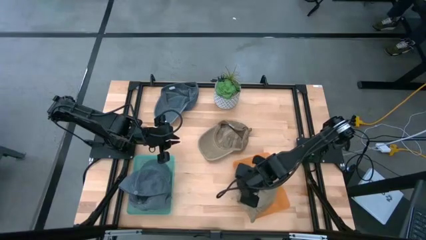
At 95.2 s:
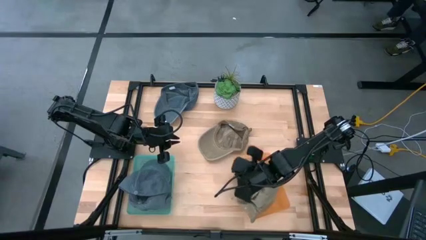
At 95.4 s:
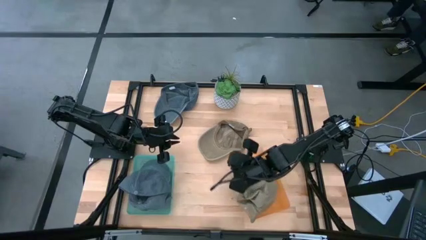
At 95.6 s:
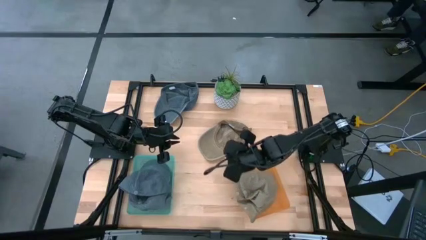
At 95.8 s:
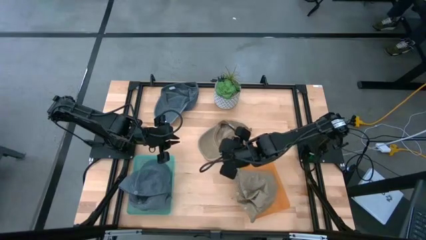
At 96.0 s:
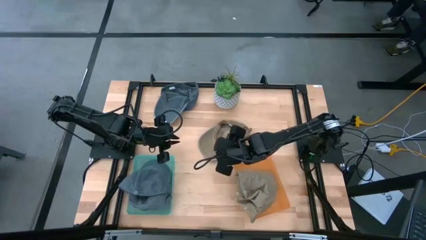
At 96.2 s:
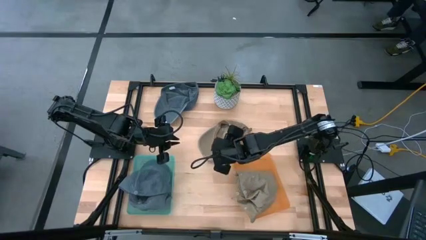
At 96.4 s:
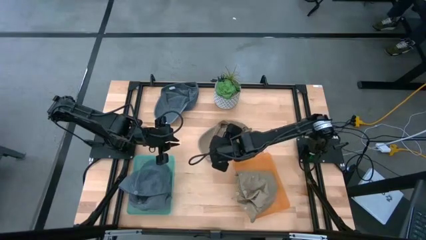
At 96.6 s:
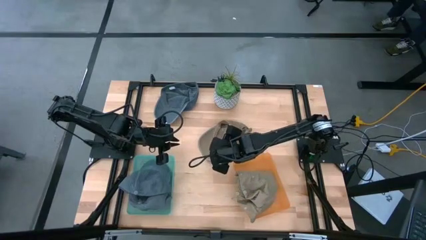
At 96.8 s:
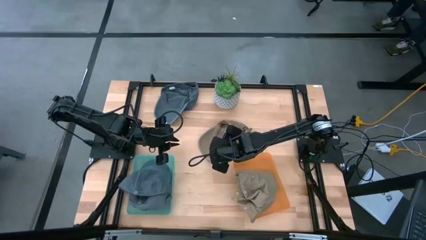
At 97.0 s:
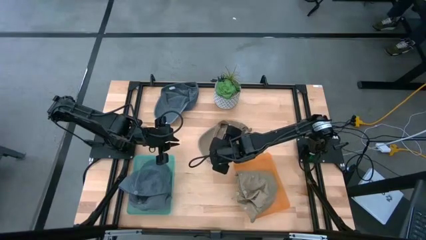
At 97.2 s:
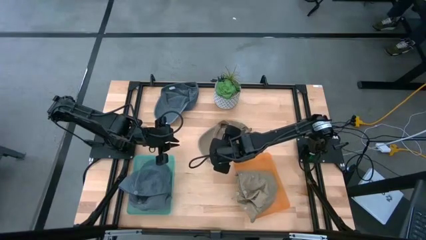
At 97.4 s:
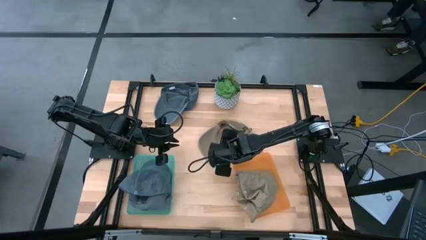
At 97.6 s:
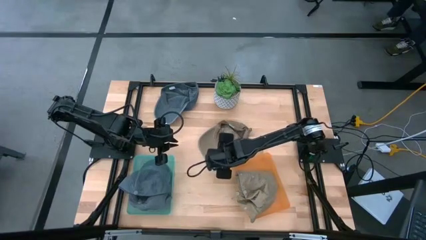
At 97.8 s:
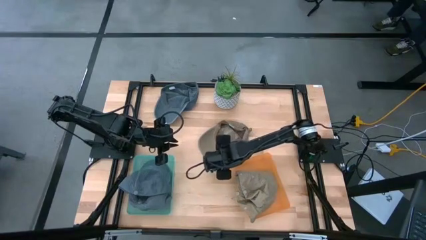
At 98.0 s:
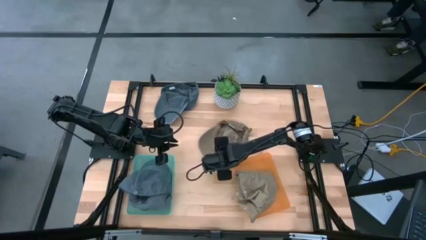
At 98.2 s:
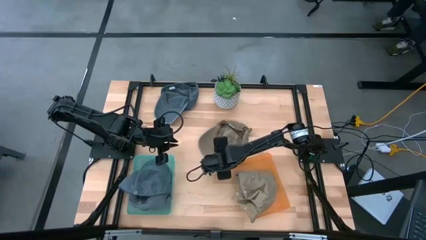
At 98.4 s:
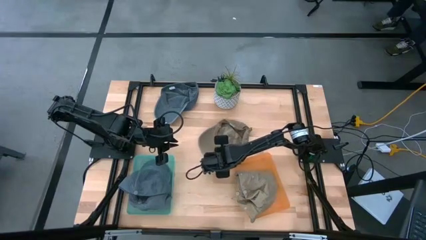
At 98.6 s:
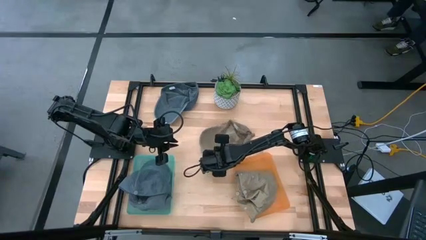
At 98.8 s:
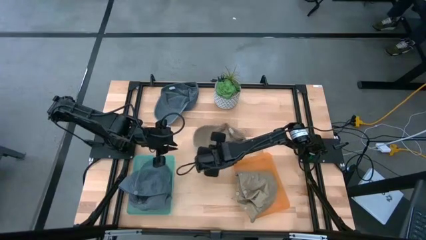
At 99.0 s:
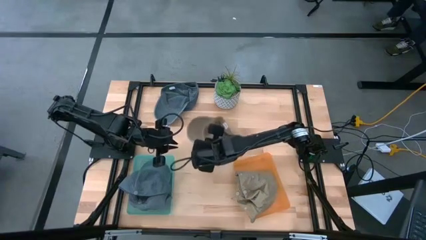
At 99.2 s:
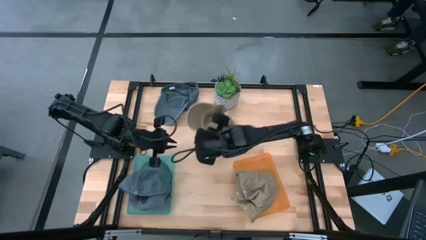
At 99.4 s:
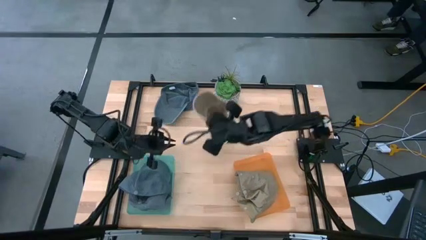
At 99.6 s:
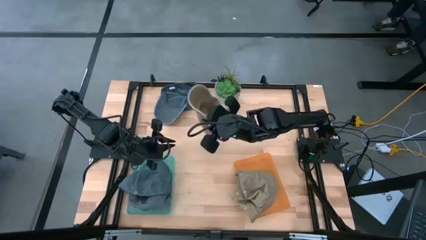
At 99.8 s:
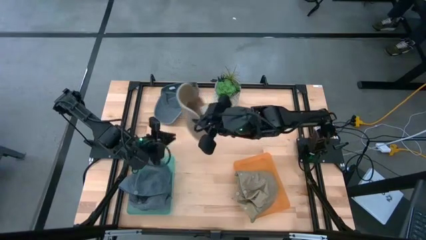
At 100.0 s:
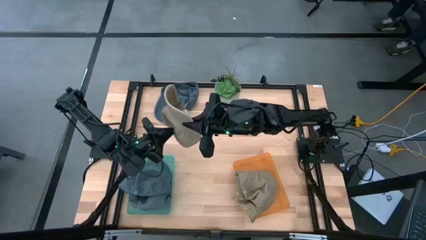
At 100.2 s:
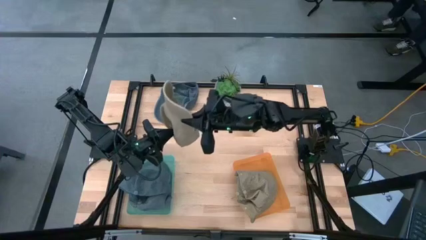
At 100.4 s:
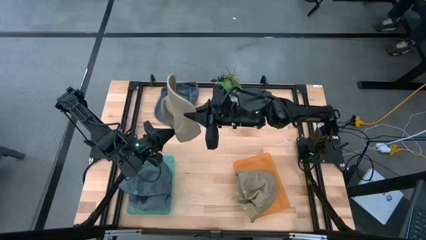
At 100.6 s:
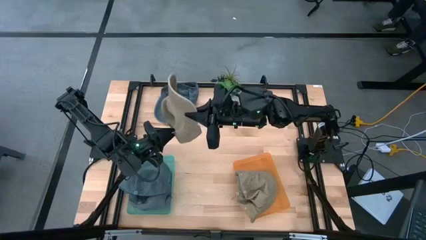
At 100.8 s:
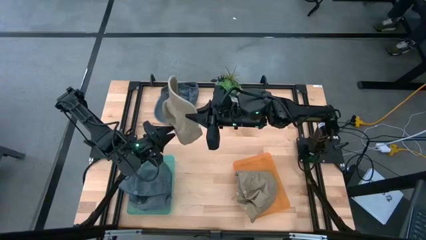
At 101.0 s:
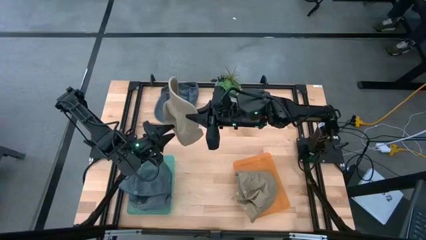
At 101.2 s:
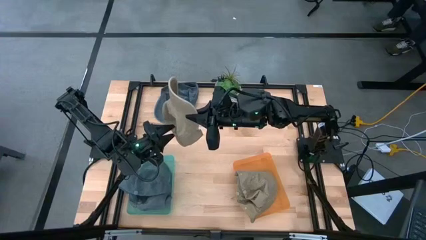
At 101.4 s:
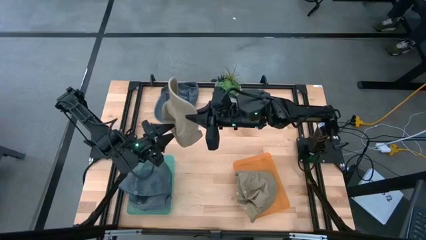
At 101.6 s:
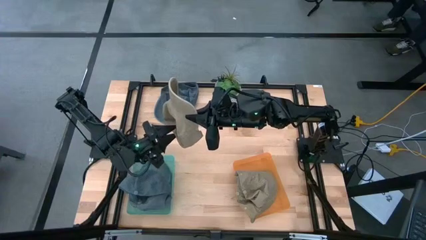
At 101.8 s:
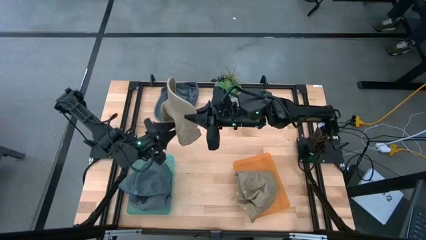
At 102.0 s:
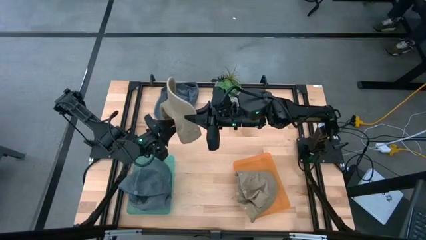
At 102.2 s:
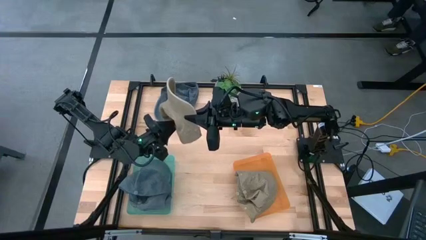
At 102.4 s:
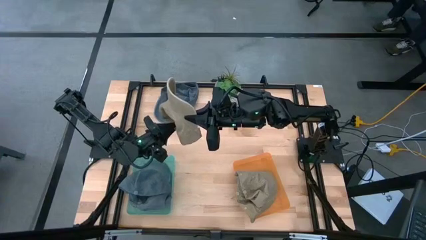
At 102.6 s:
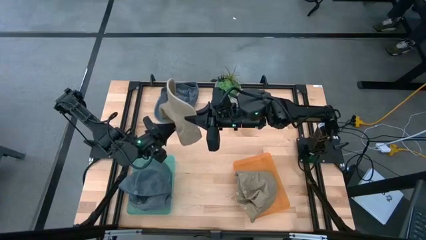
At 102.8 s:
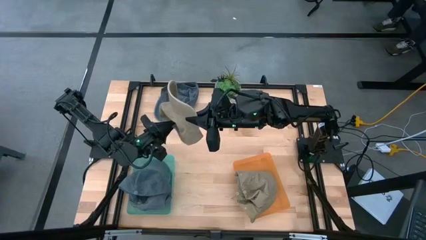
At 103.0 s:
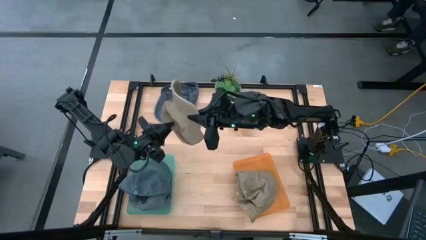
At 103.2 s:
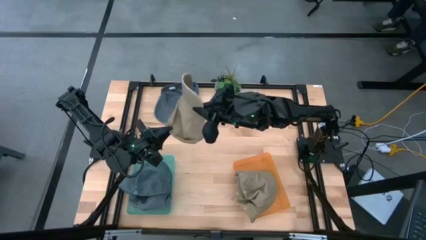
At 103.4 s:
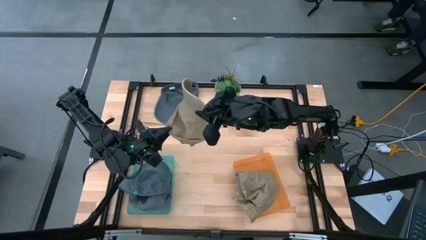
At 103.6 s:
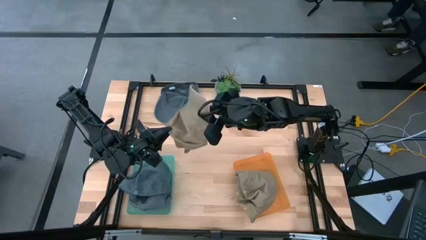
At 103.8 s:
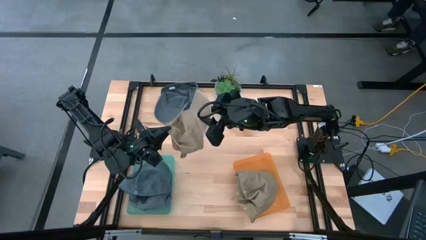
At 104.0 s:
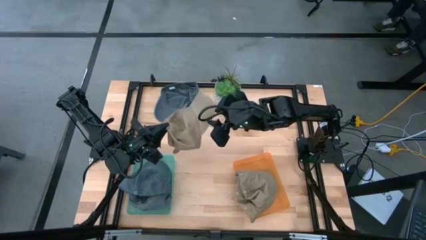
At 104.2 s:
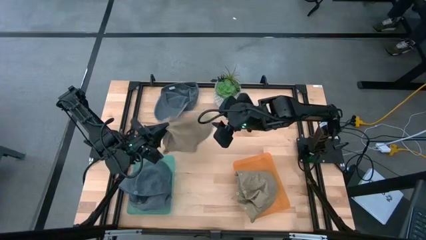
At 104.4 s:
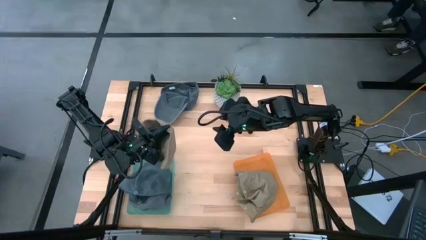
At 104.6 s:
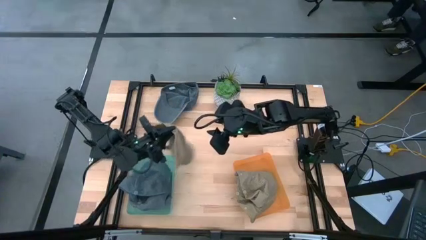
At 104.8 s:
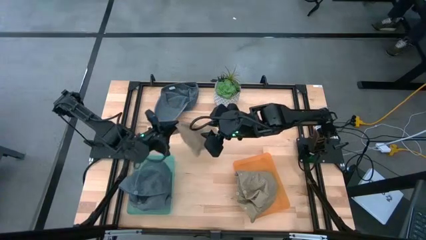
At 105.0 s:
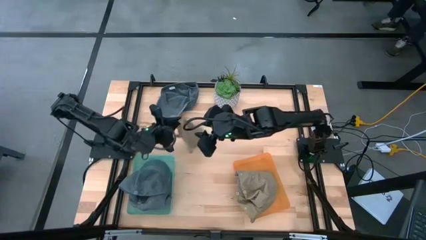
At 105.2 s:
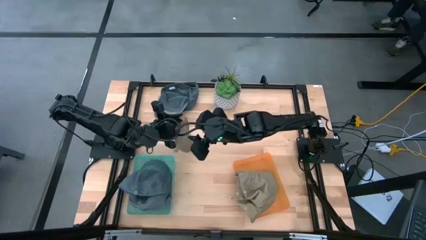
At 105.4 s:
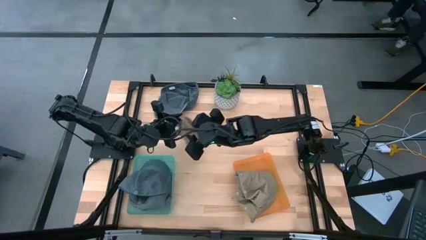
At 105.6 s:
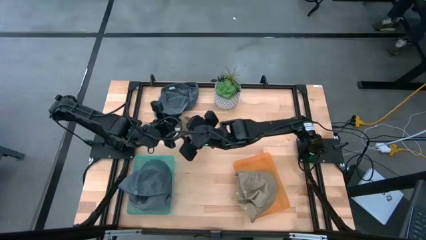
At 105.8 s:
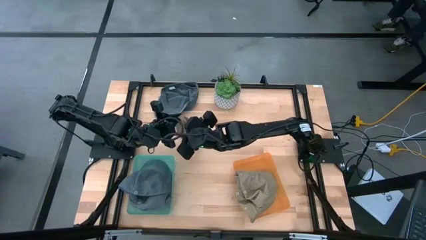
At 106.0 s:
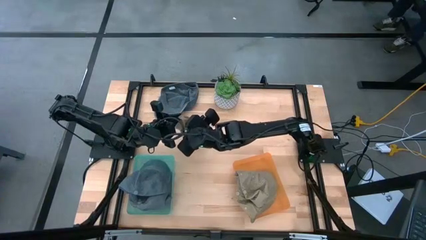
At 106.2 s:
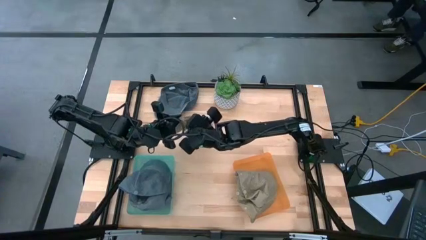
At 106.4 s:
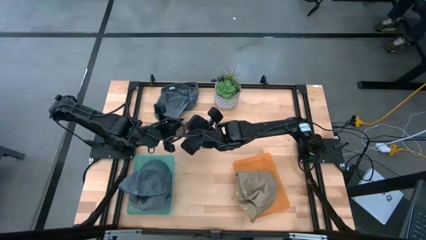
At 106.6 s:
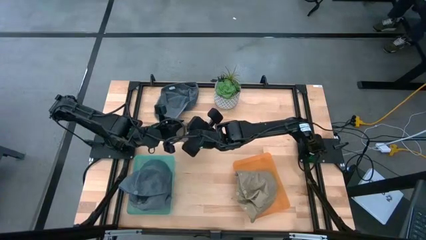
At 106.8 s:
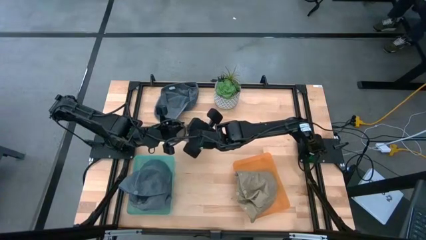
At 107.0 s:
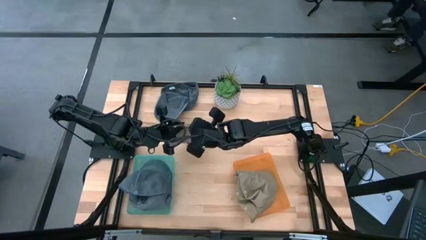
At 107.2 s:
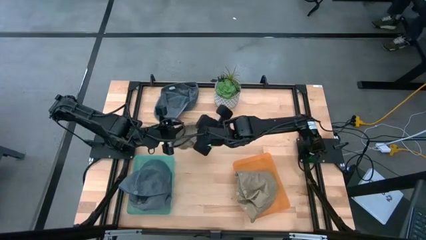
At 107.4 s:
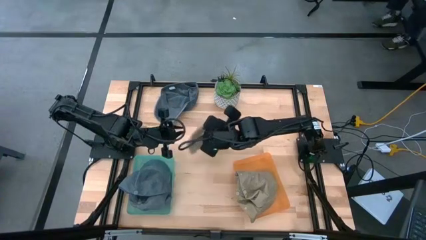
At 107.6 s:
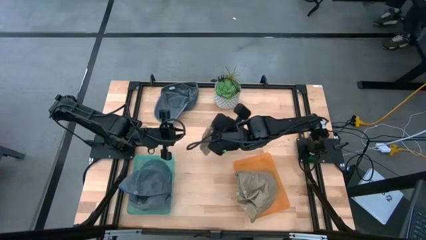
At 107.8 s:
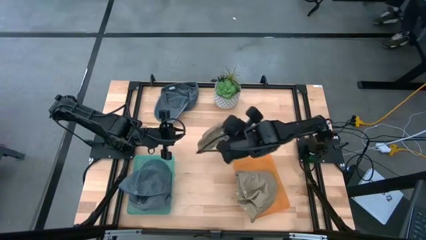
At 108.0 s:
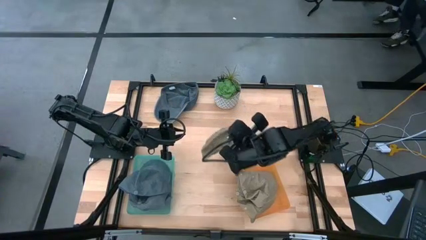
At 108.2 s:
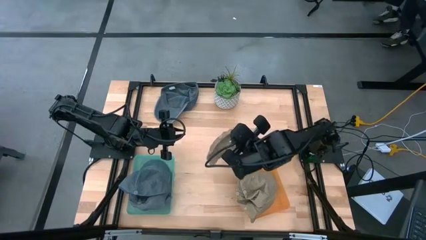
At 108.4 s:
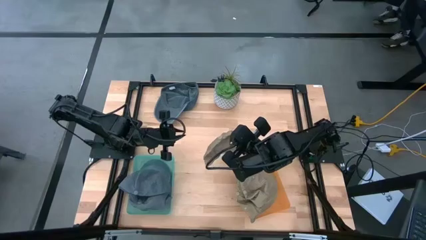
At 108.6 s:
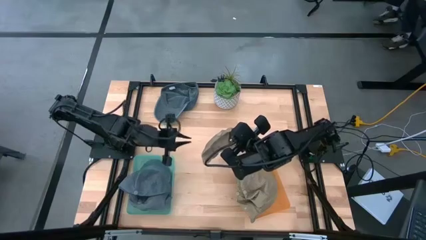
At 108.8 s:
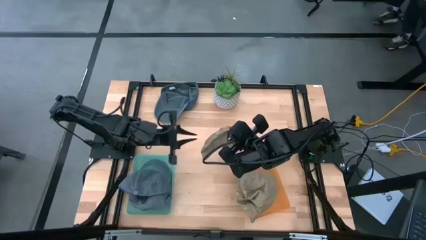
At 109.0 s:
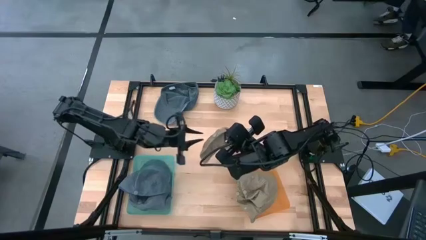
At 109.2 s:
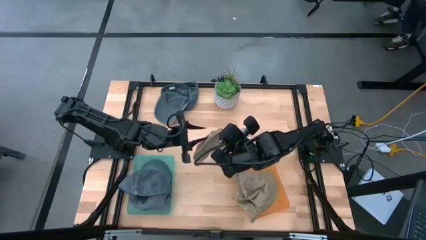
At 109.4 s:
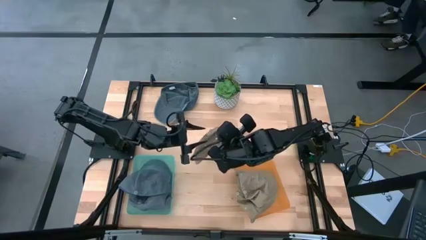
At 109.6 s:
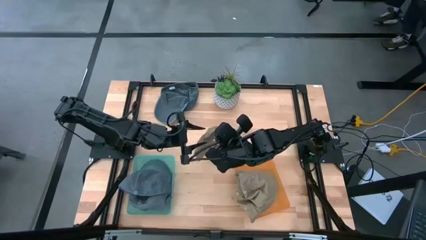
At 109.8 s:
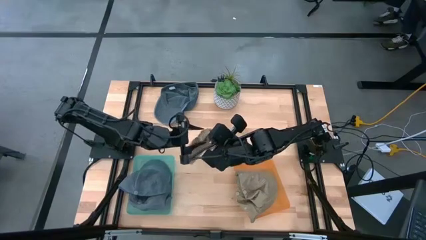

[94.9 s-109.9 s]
Task: Pick & Place hat
Put the brown cap into the orange bin

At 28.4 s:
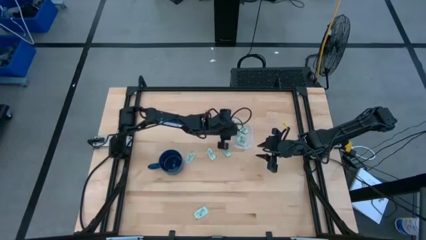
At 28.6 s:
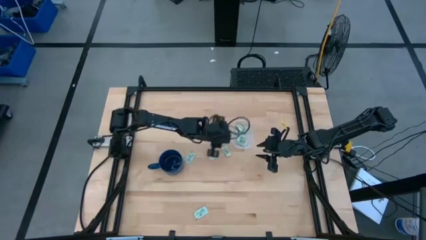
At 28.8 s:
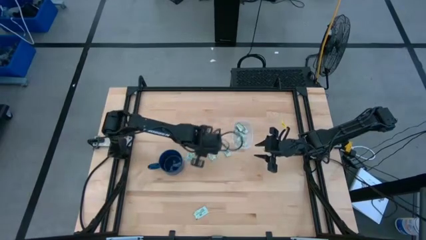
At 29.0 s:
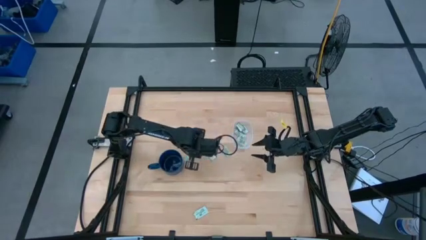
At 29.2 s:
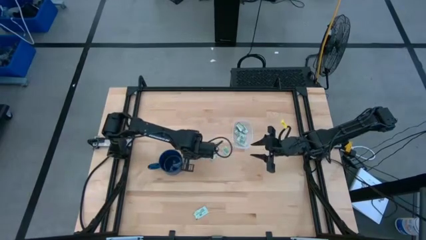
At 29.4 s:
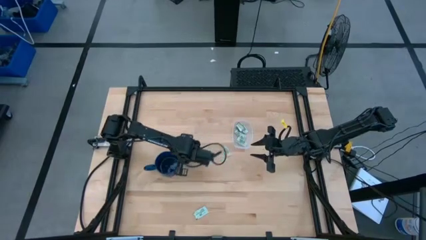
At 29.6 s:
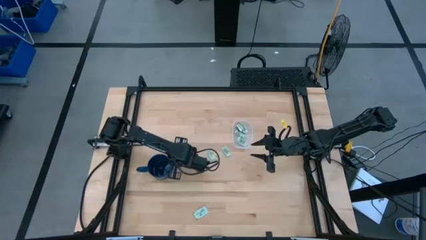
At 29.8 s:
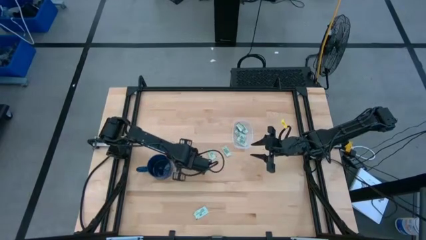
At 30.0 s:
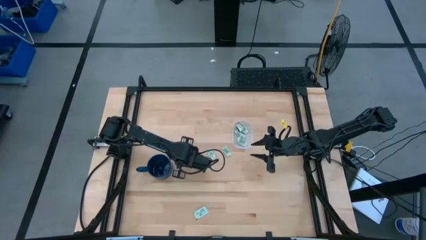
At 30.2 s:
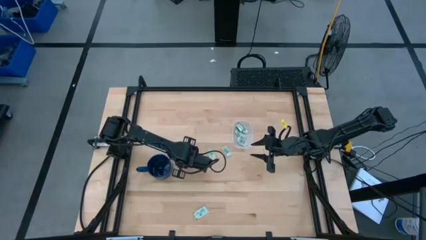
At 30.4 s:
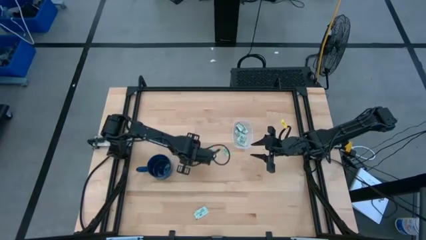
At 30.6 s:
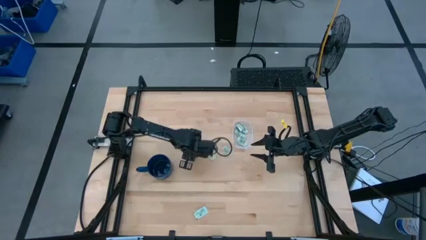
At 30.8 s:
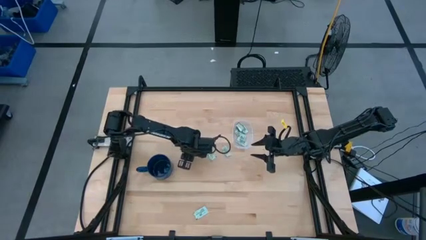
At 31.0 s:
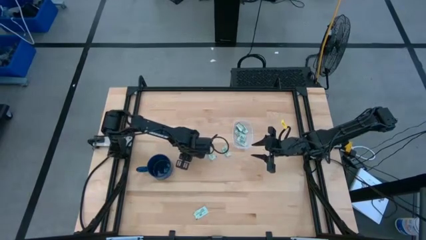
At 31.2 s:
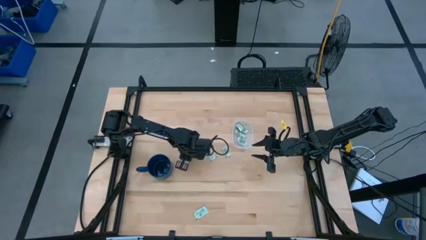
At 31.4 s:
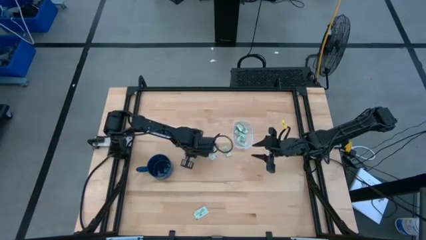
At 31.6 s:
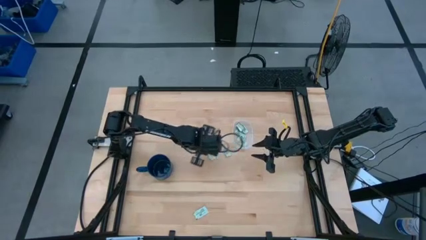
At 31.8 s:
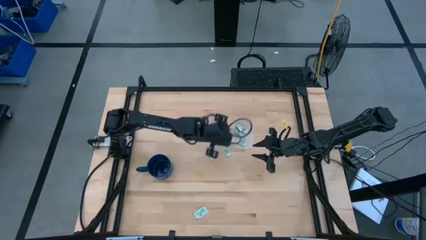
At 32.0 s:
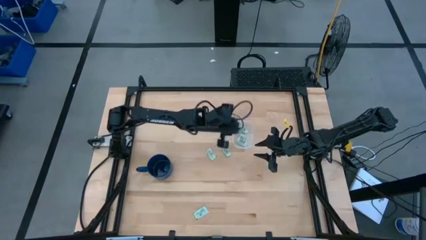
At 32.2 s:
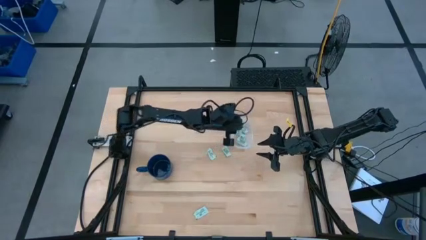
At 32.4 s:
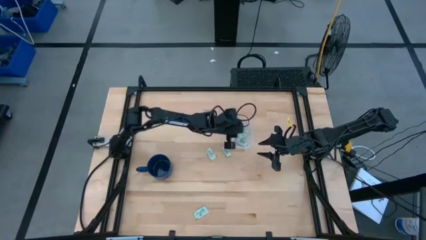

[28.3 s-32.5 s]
Task: Pick and place Stevia / Truvia into bins
Put the light green stevia packet into the transparent container
